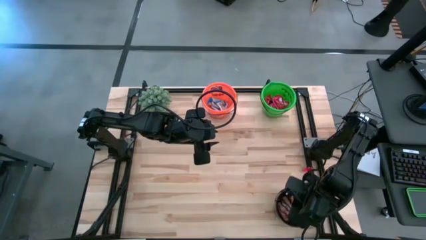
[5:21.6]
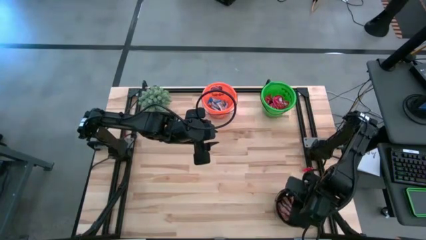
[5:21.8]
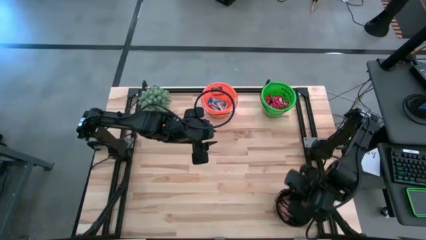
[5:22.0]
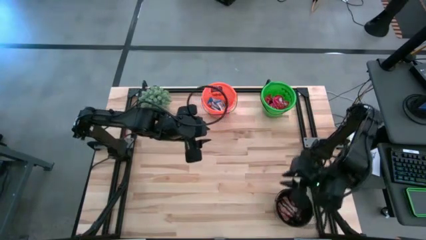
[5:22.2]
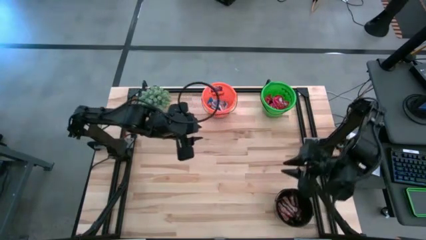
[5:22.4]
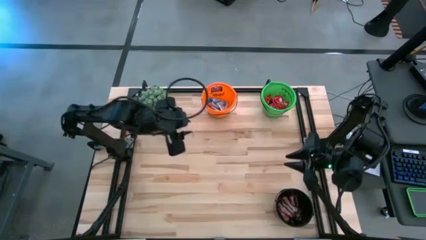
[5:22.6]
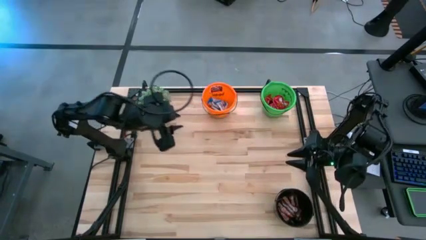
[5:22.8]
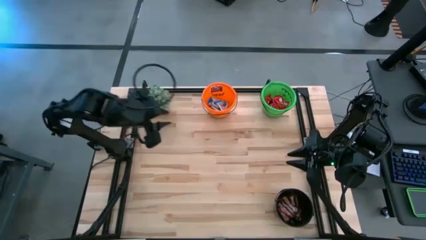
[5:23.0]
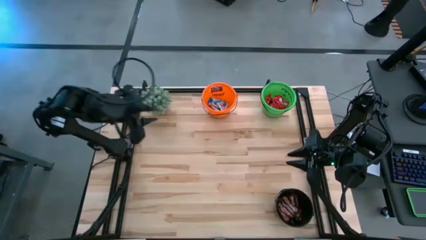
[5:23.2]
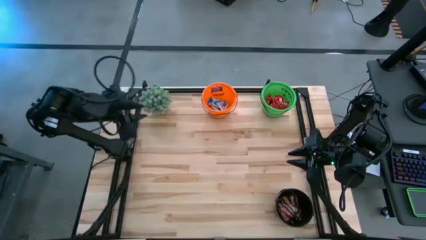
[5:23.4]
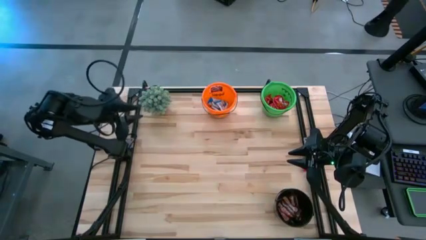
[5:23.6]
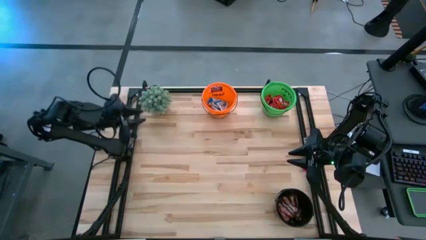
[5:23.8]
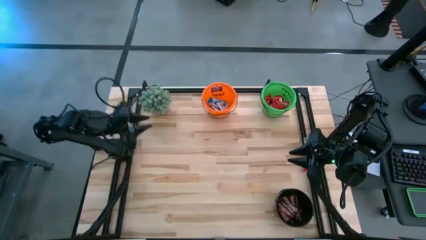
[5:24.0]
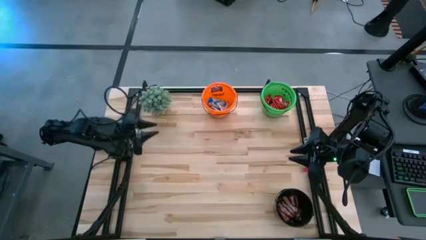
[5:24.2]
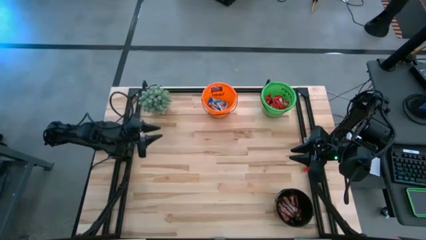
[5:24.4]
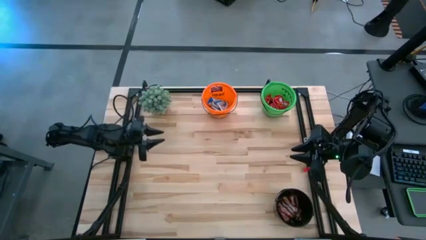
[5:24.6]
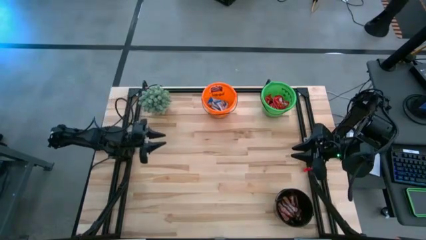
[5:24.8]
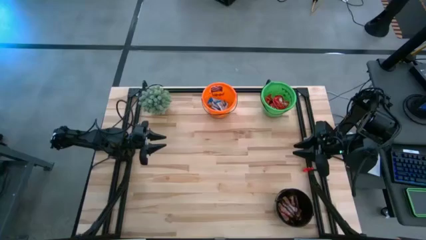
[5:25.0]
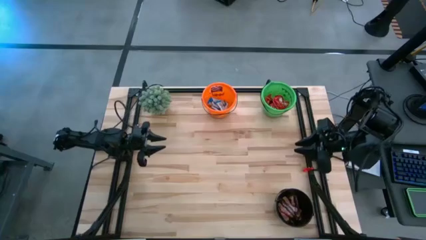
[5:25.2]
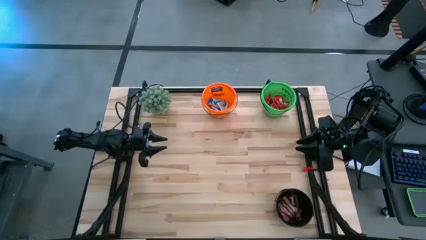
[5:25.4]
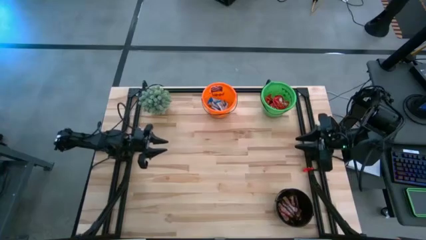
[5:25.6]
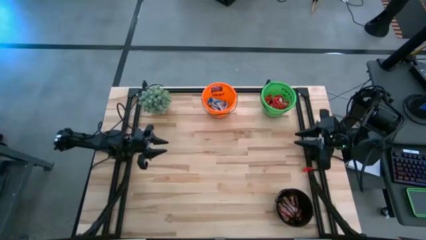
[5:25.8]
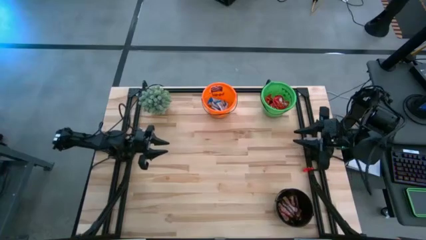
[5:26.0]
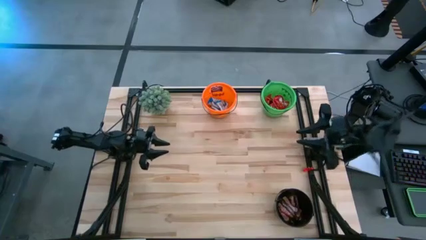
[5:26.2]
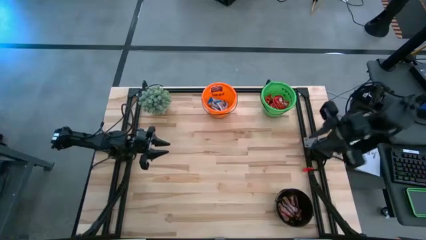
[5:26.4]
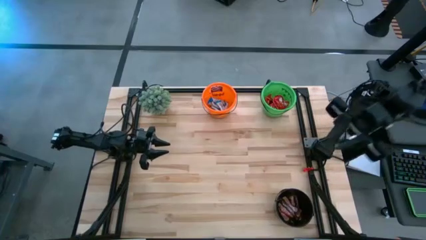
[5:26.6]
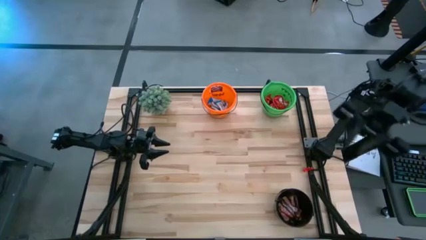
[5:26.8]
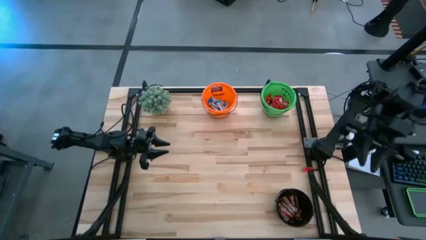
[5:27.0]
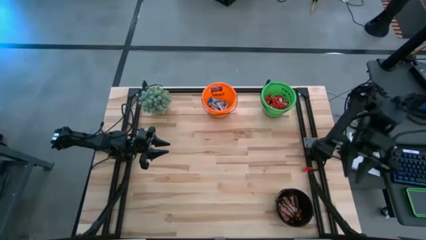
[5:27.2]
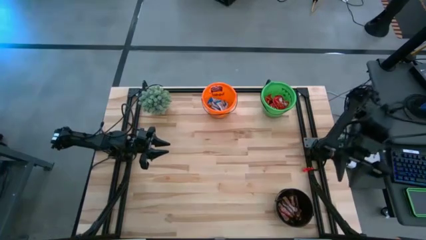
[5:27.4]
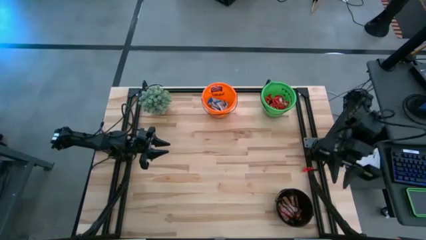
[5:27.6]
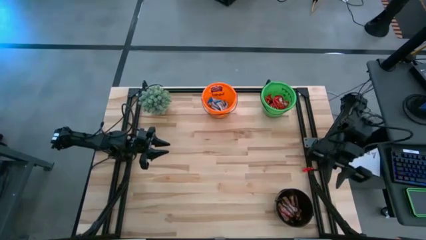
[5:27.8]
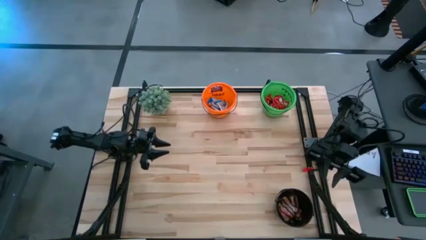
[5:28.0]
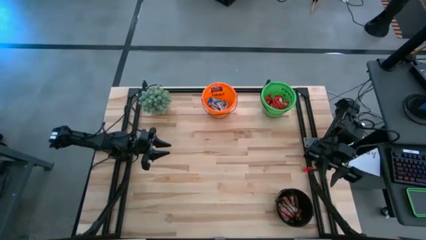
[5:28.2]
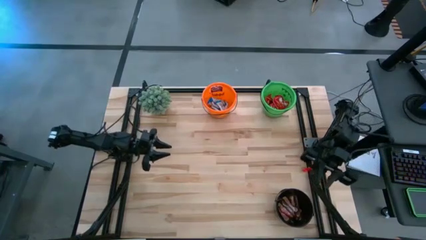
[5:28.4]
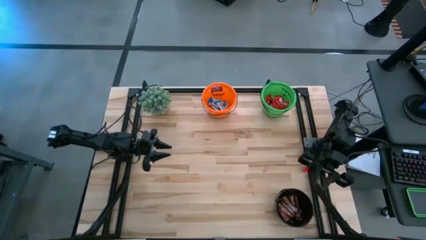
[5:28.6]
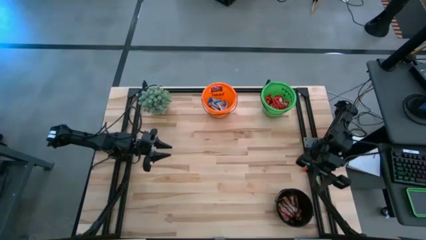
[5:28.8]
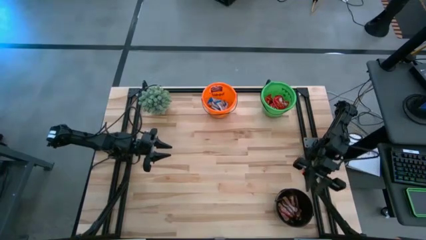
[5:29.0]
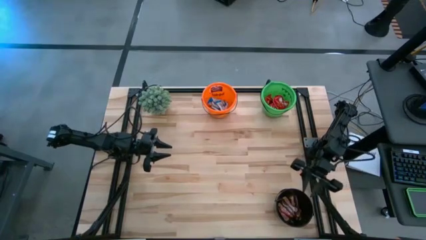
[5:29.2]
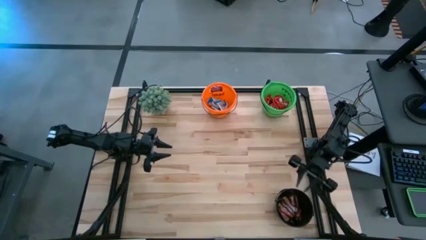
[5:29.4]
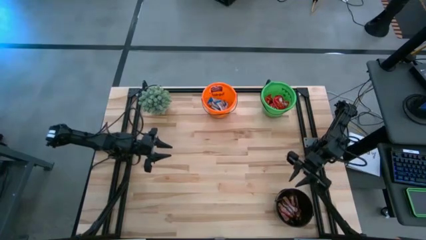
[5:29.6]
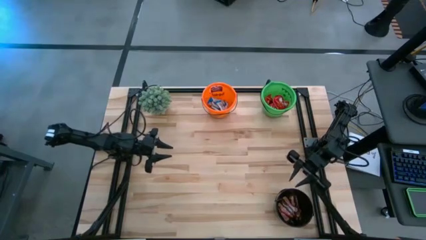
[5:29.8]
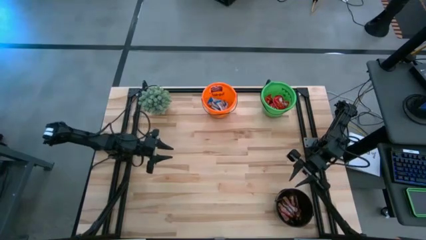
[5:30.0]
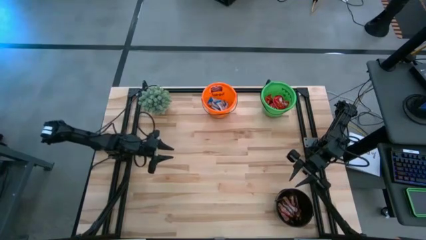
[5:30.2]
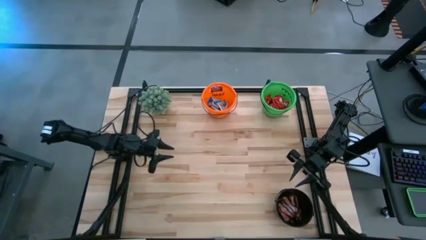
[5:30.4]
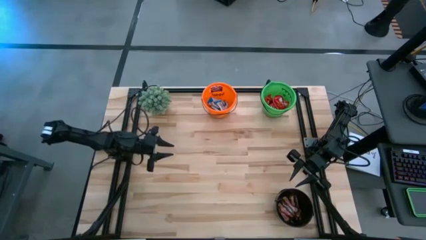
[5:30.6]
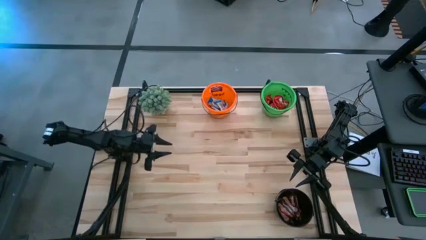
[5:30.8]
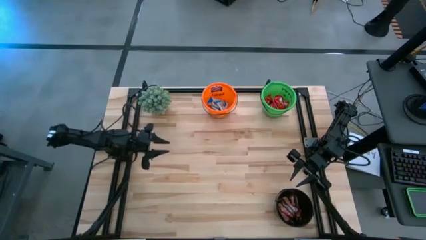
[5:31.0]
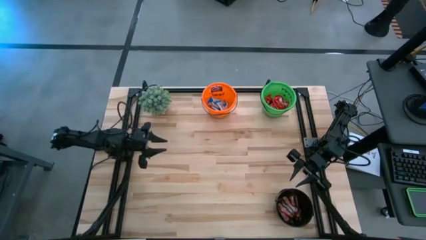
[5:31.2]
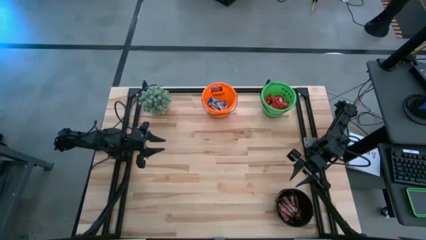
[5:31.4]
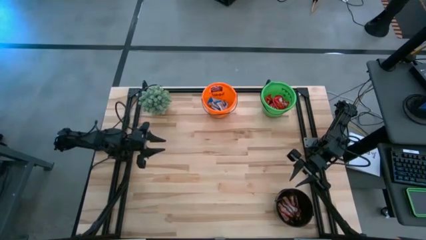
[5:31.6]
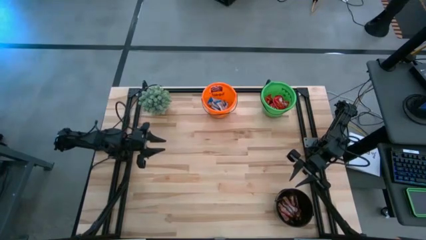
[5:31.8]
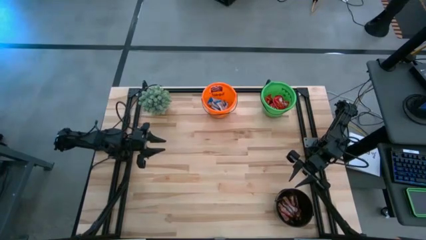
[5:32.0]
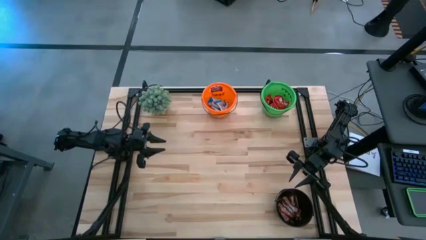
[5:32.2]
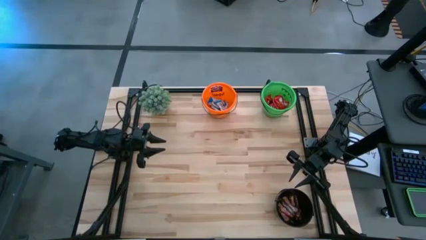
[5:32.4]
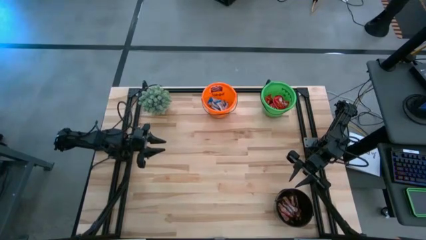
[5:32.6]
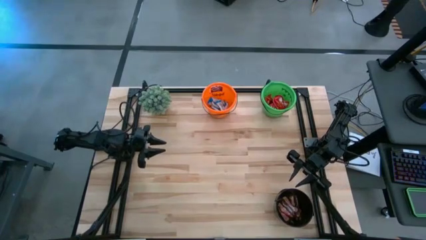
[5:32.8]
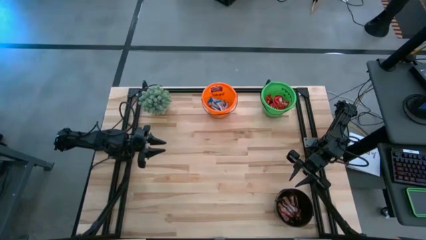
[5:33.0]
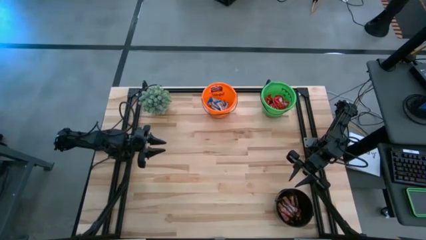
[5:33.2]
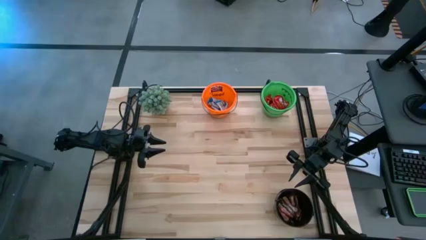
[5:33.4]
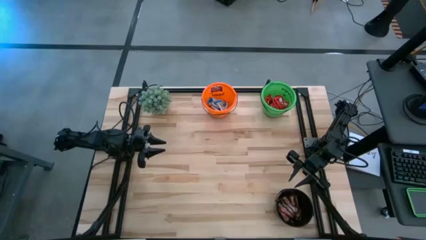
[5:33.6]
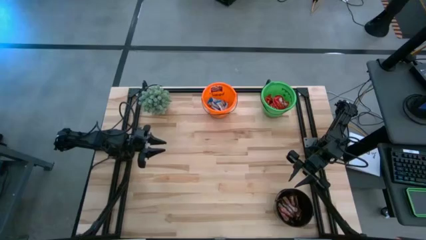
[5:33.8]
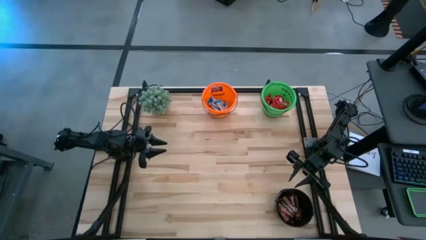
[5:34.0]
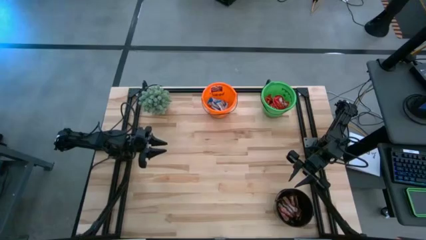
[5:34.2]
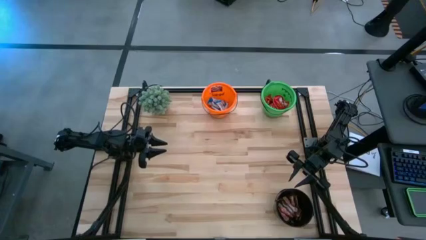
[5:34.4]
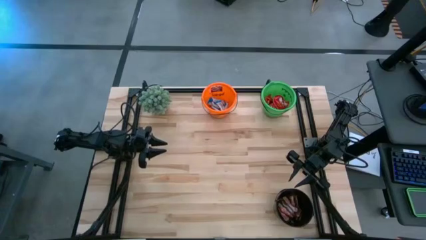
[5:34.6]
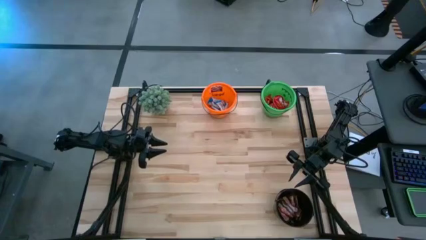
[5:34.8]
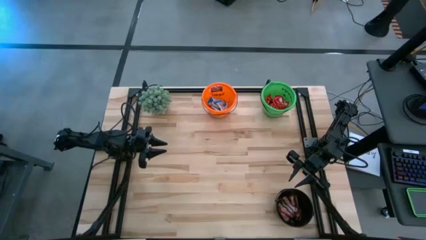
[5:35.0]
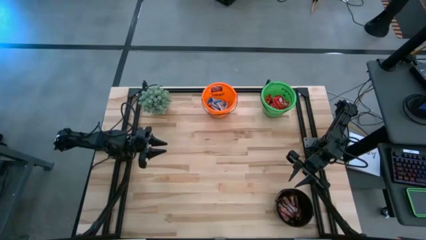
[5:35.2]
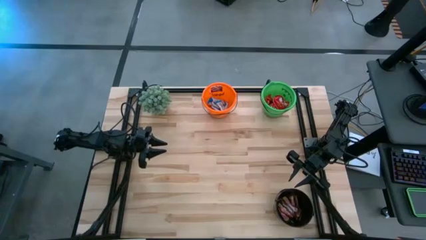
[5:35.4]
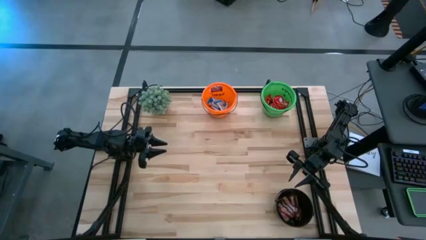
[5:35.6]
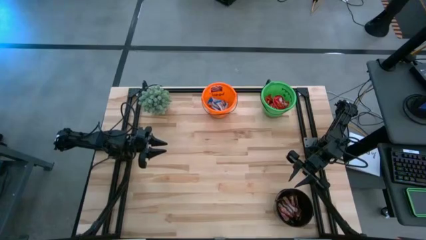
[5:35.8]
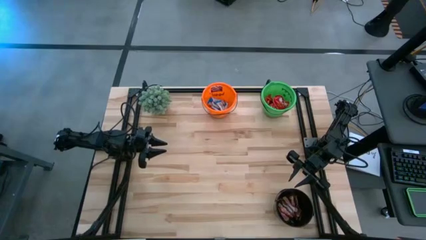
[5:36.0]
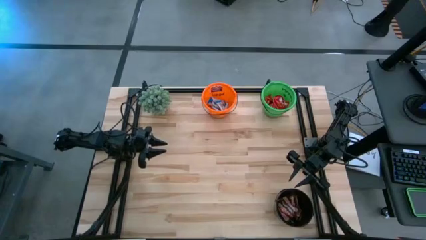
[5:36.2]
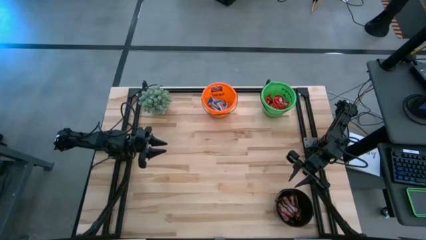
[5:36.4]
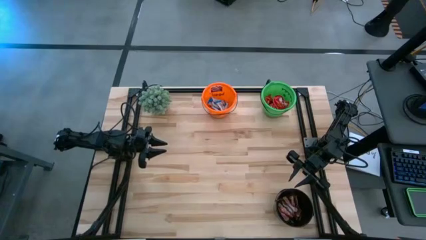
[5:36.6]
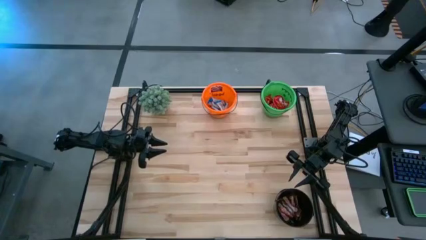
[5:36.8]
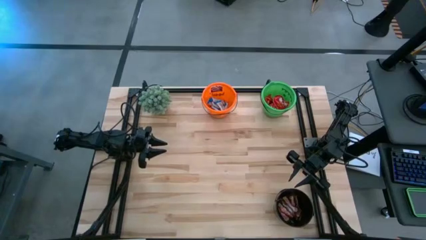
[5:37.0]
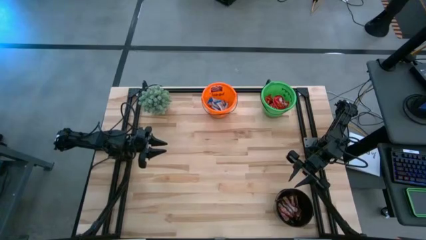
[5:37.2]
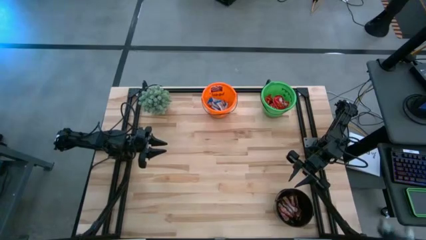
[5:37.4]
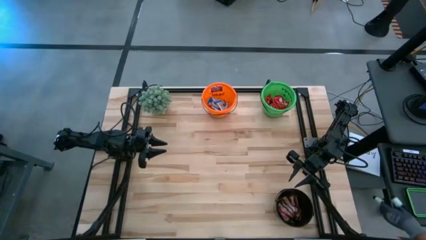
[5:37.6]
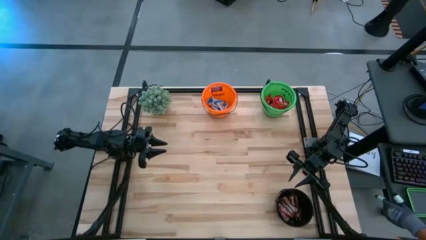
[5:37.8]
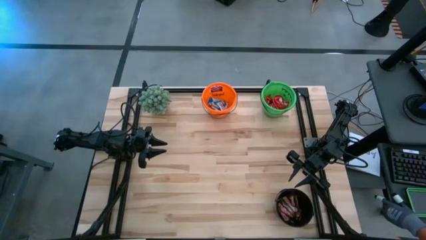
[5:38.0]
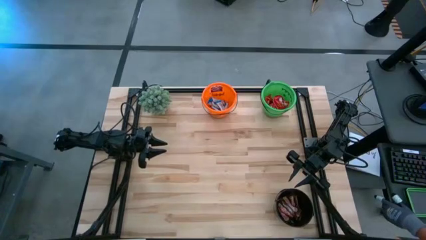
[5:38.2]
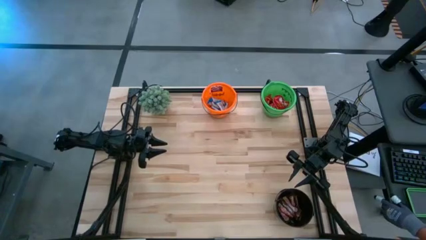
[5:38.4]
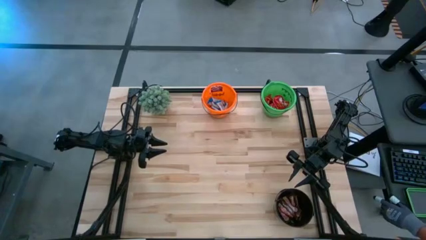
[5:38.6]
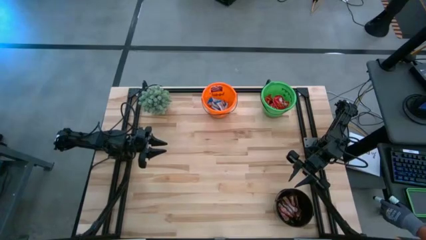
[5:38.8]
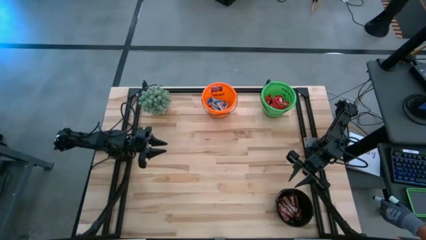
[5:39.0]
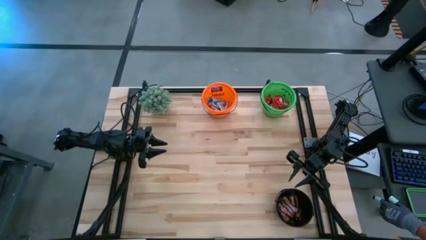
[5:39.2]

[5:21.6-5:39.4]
Task: Organize candy in baskets
Return to Home Position
